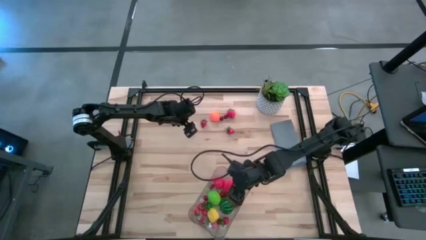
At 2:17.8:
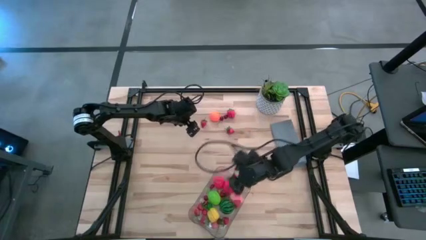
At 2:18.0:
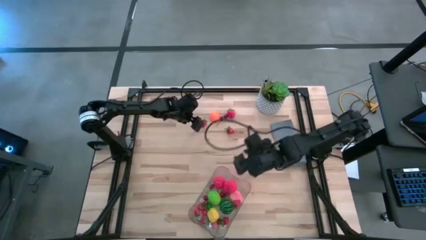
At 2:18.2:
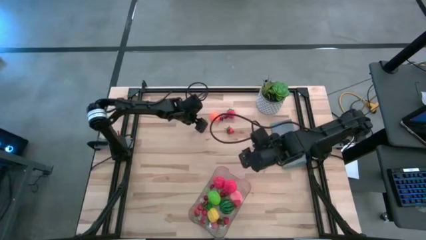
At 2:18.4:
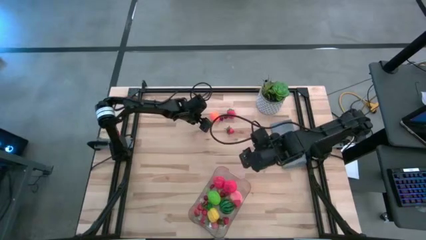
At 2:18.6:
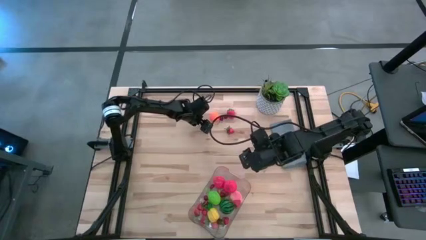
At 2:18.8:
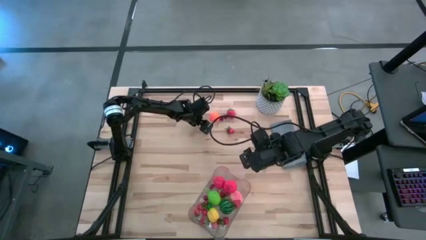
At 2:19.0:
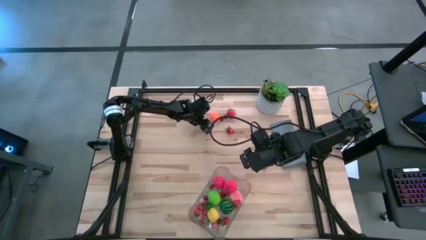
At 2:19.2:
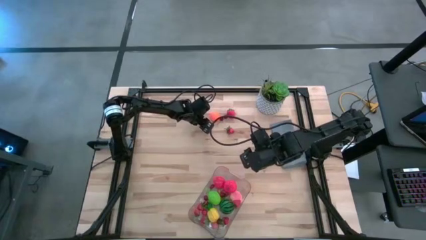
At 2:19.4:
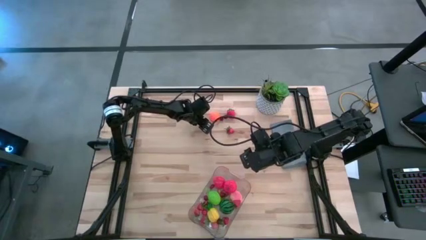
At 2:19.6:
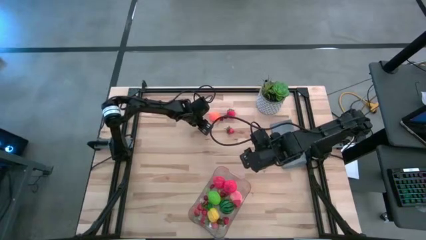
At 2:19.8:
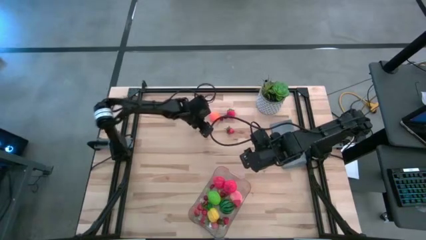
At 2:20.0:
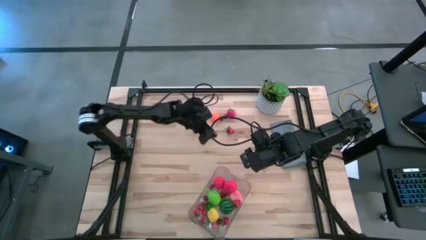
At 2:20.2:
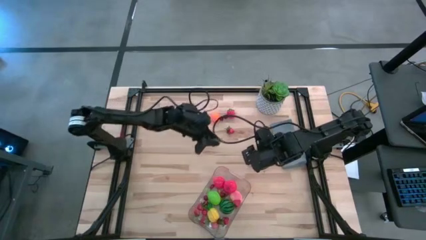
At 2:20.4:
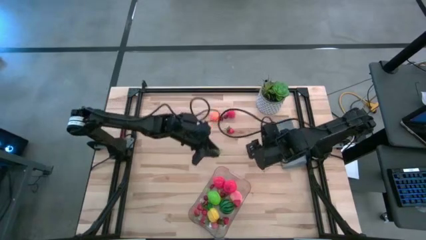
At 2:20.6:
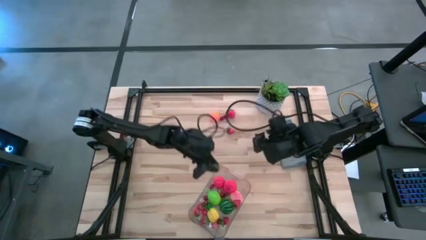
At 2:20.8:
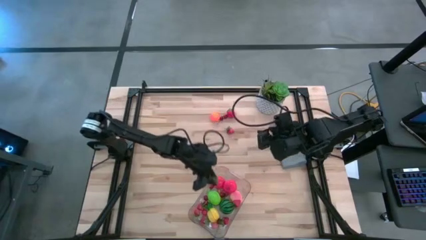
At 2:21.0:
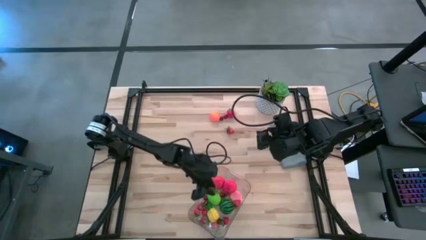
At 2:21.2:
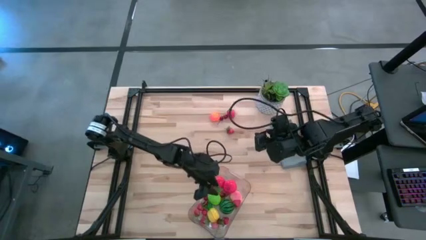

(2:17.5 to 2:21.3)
Task: Pick and placing Produce into tupperware
Put the red strawberry into the transparent basket

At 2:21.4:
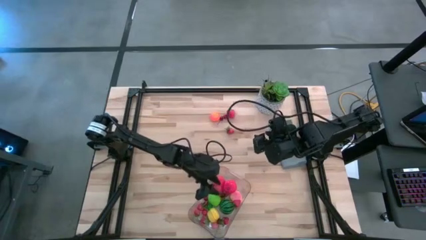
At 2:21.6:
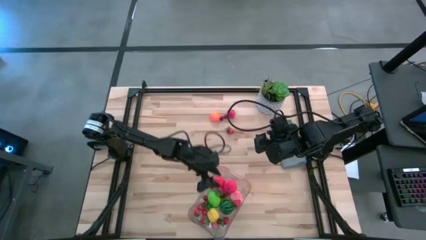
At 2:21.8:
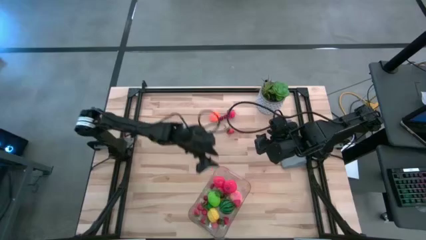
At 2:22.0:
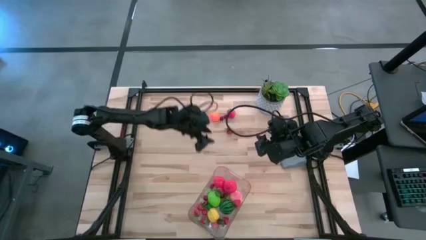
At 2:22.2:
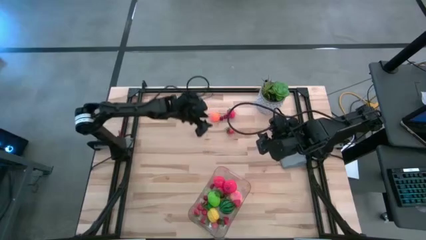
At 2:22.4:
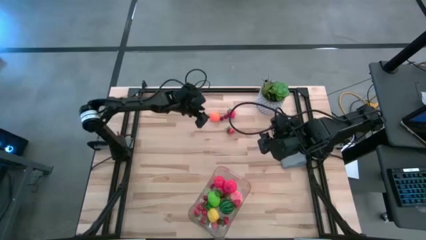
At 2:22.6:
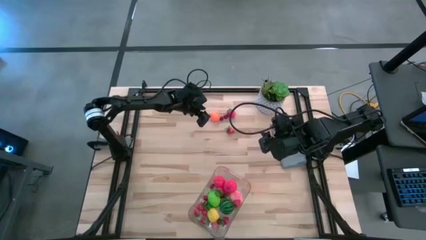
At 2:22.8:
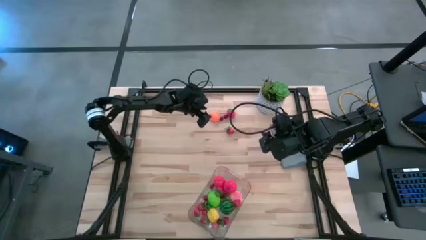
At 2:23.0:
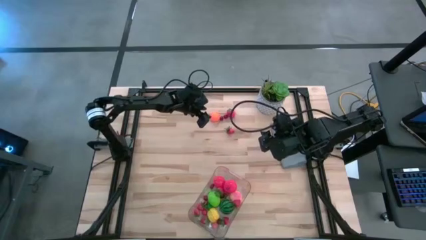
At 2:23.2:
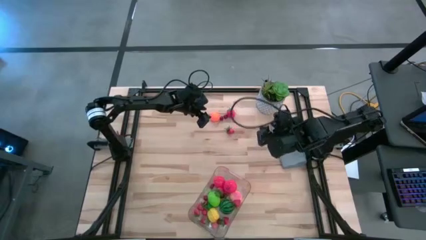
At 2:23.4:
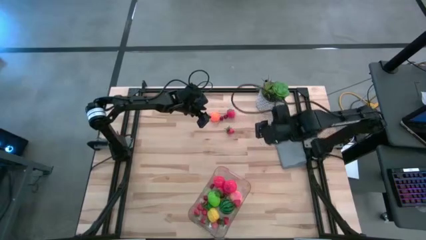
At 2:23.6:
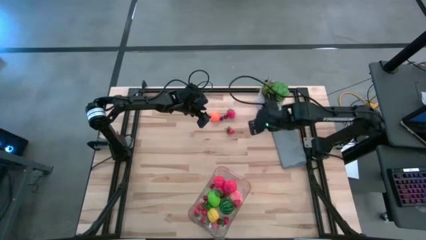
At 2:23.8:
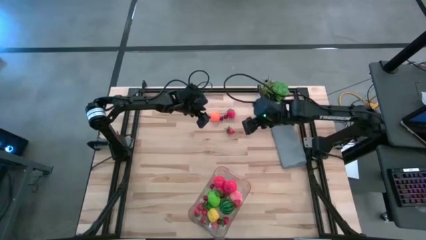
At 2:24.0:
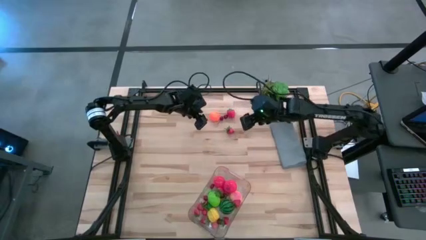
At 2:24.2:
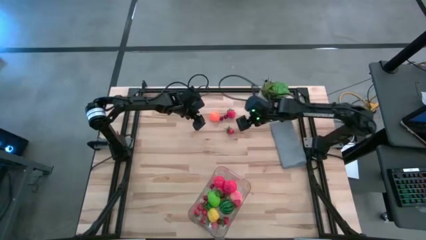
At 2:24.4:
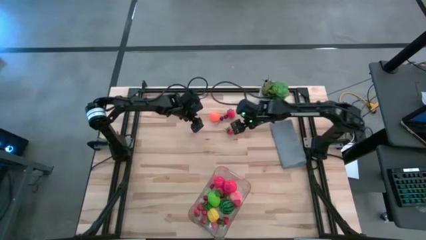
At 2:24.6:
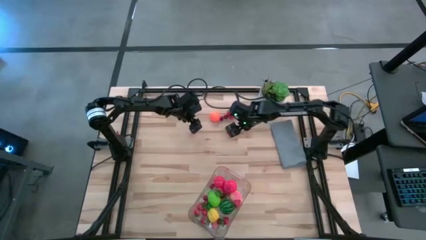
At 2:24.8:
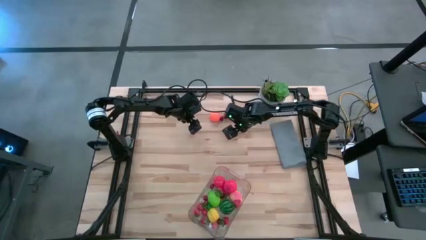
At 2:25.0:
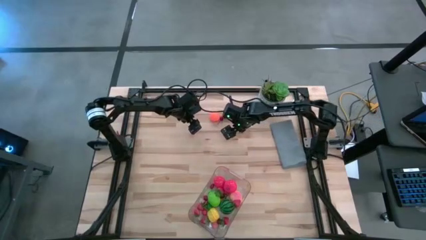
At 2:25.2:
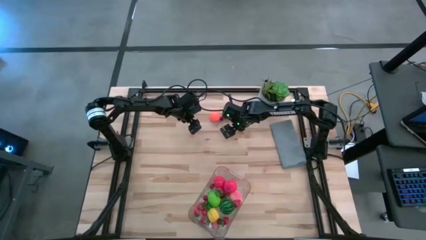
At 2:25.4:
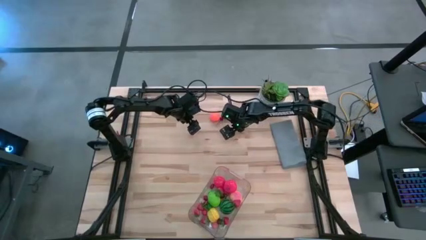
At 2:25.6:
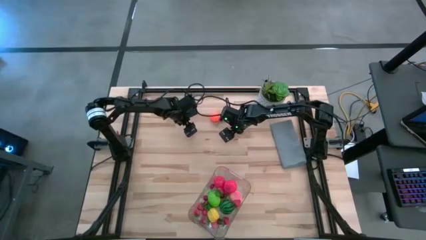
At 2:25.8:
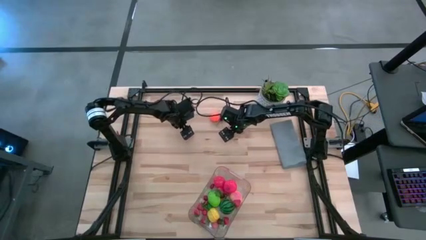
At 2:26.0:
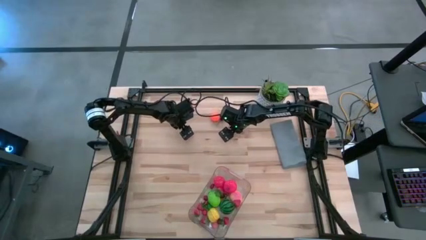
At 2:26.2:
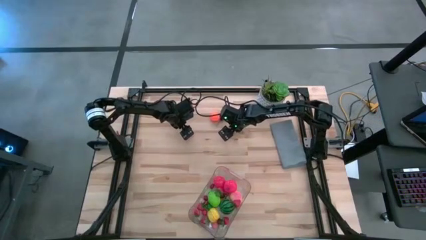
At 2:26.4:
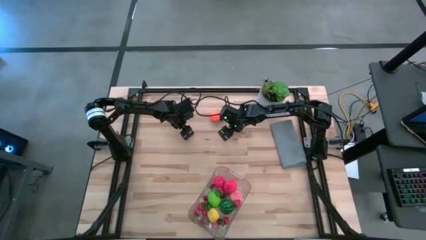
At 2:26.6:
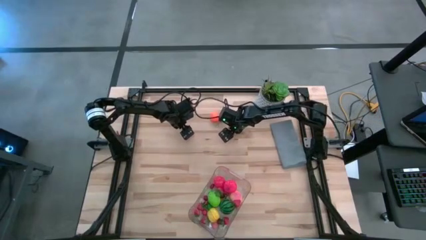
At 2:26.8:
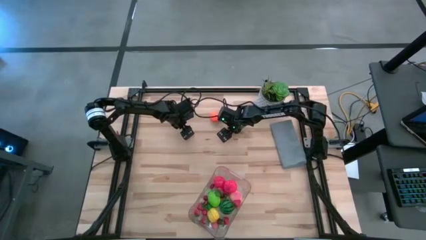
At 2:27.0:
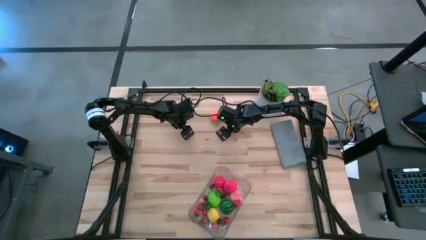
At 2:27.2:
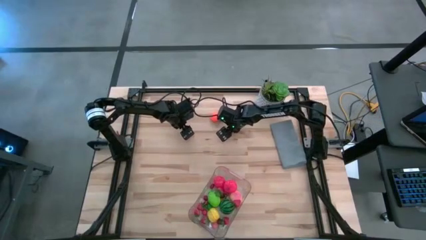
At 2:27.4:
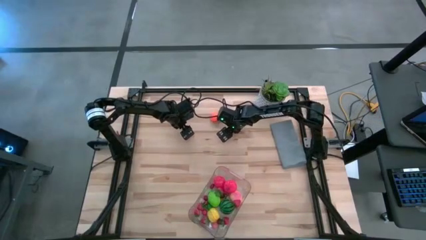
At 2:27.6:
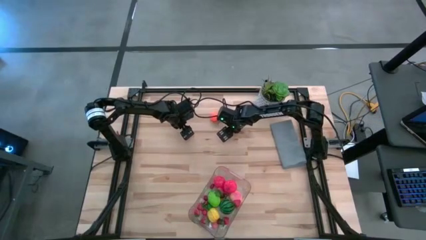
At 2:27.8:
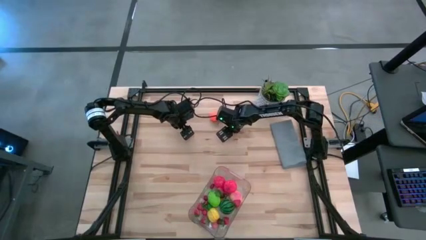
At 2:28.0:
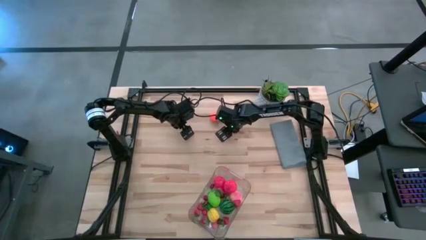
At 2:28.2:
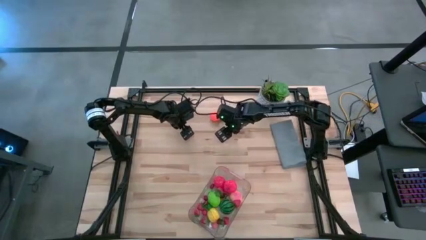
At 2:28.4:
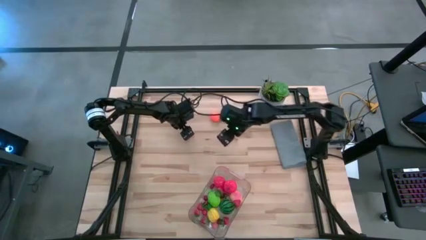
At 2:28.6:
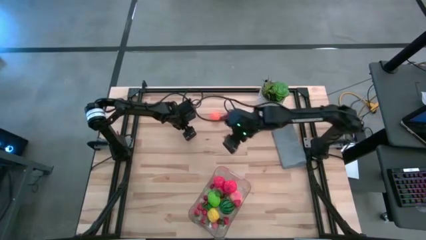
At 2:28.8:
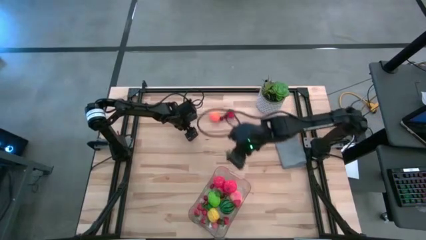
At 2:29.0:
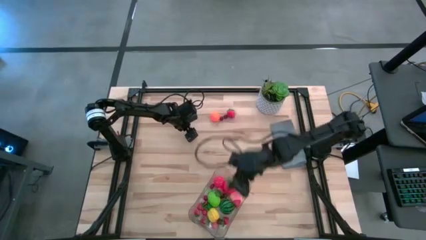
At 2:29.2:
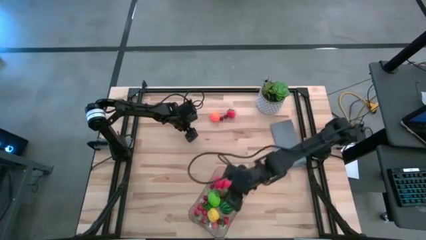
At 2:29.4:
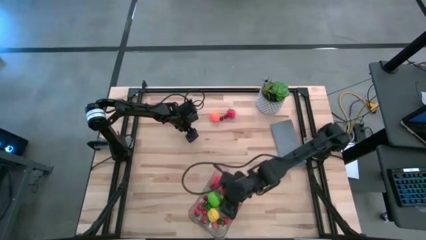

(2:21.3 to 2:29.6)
Put the red strawberry into the transparent basket

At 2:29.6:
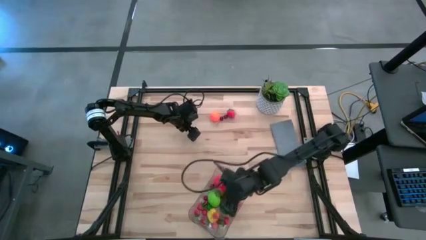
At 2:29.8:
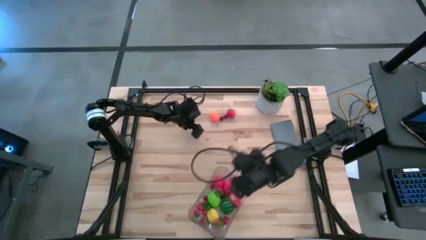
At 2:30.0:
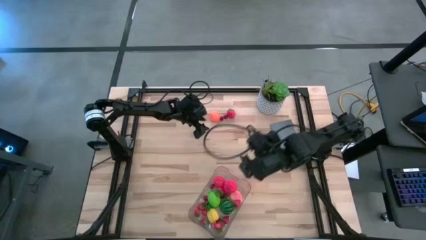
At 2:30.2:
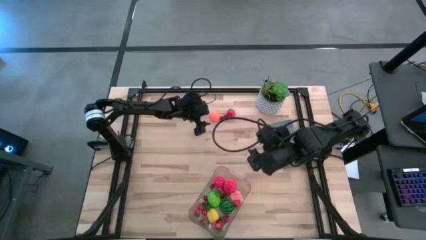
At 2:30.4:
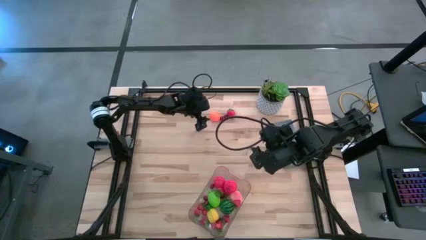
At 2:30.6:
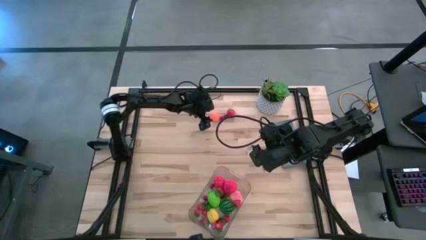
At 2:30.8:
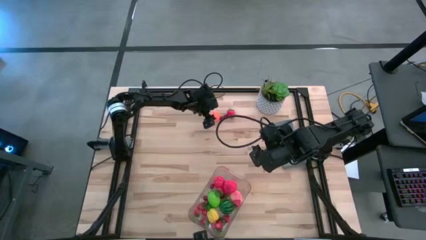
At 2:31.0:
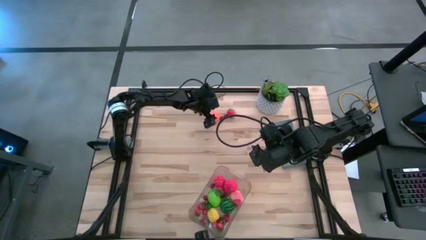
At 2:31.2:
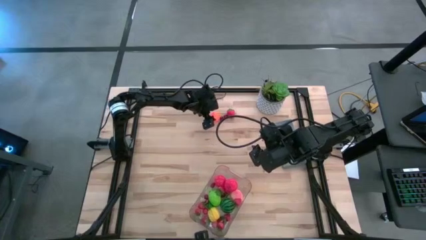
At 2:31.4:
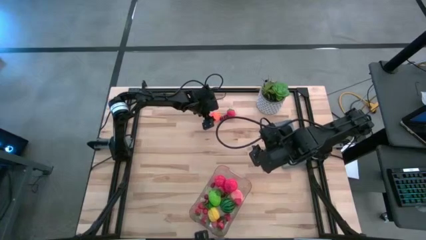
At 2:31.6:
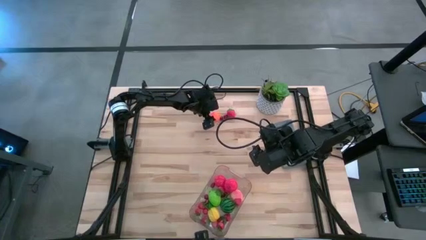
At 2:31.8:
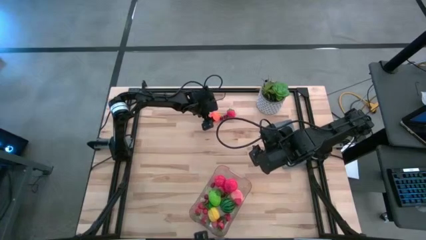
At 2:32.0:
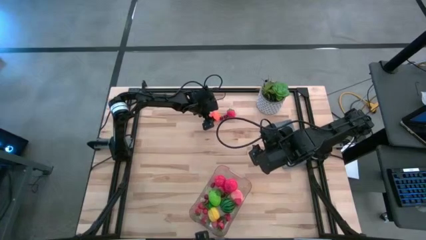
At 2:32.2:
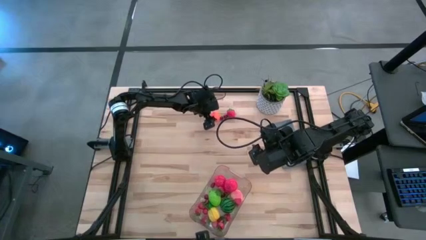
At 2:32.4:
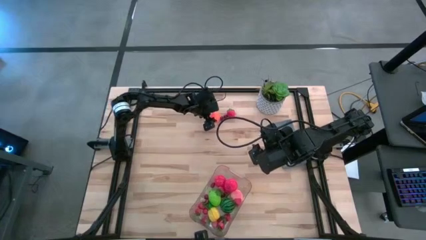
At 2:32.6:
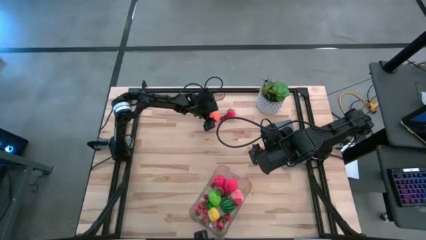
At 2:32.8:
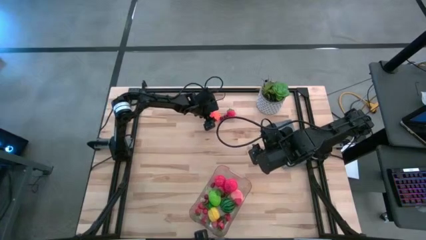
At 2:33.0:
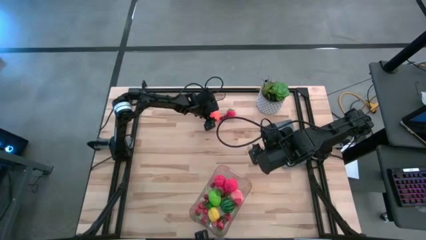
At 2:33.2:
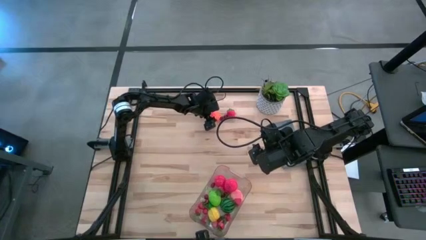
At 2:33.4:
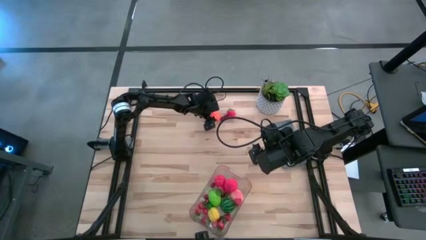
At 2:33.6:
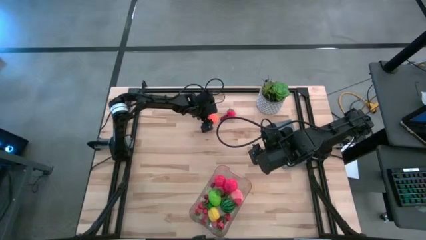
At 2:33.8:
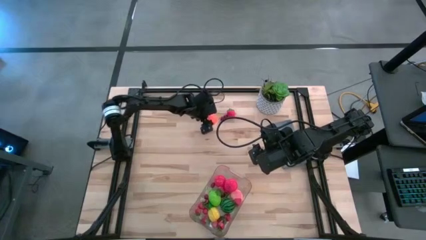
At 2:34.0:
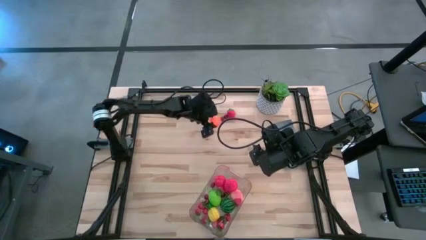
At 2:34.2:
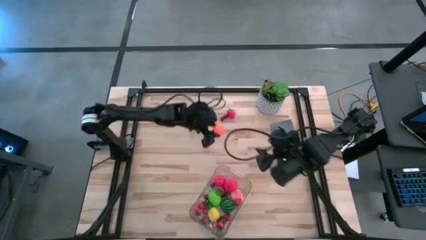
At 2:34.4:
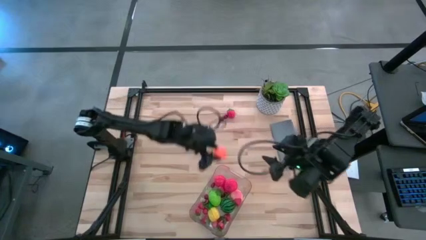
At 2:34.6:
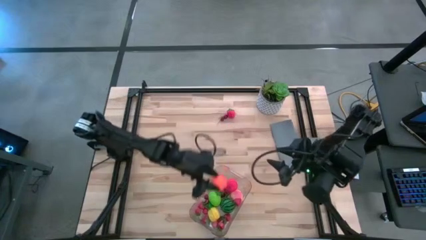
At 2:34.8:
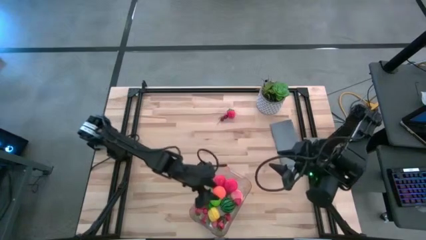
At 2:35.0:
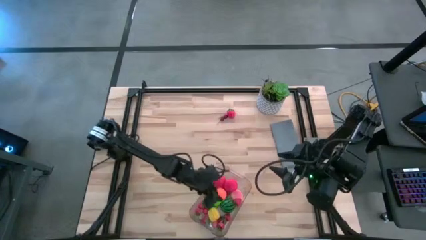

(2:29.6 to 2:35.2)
Put the orange pumpkin into the transparent basket
